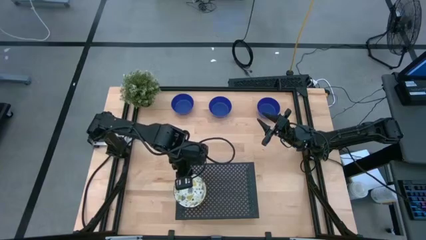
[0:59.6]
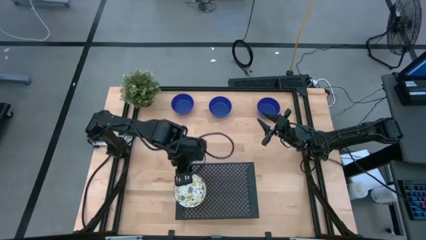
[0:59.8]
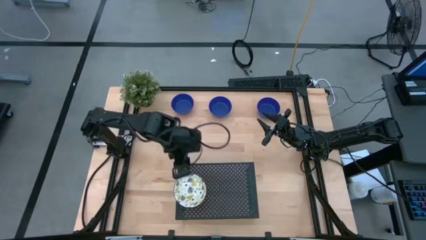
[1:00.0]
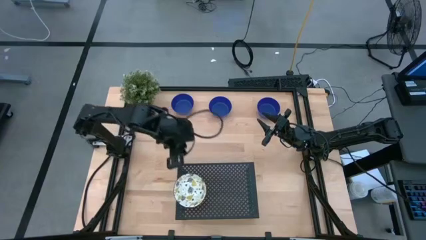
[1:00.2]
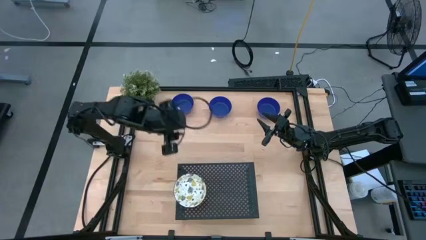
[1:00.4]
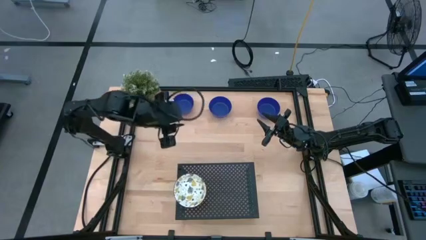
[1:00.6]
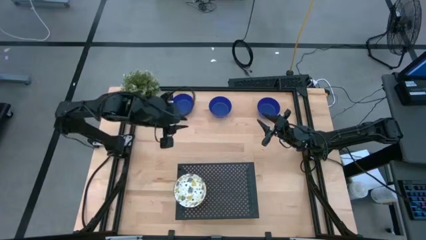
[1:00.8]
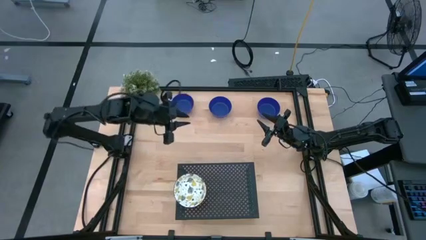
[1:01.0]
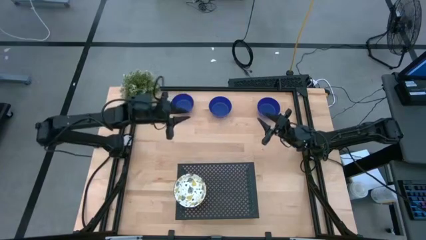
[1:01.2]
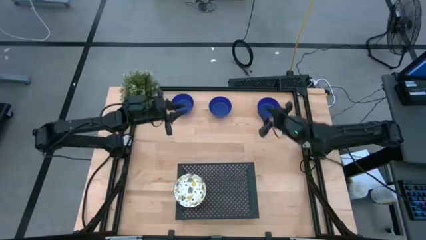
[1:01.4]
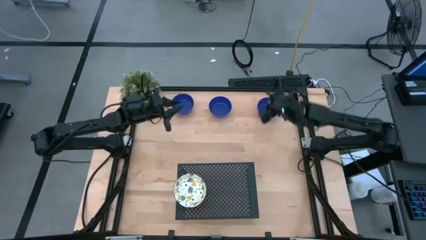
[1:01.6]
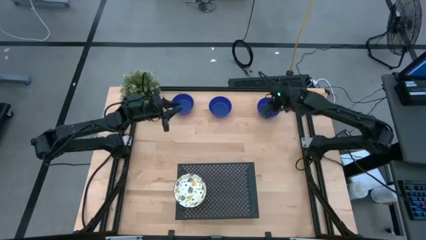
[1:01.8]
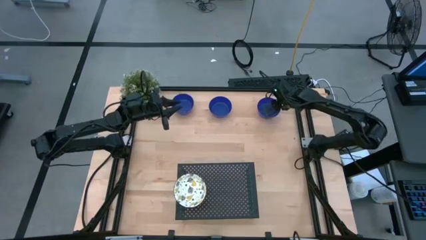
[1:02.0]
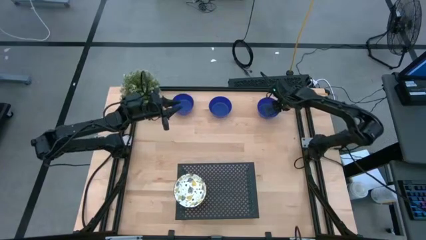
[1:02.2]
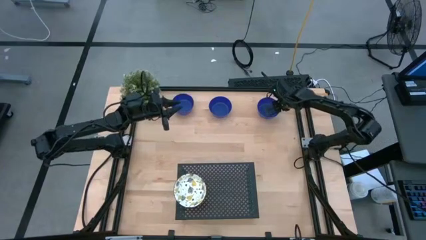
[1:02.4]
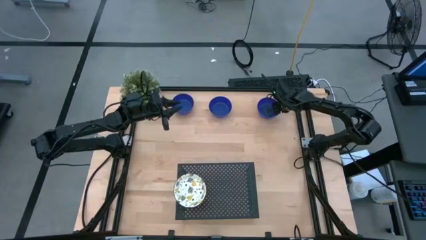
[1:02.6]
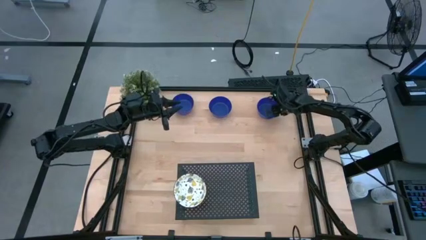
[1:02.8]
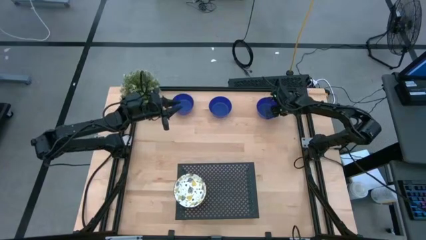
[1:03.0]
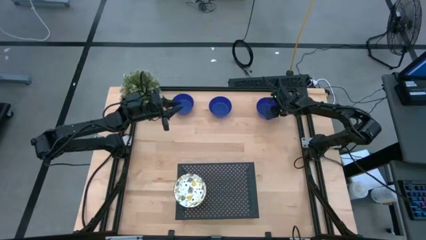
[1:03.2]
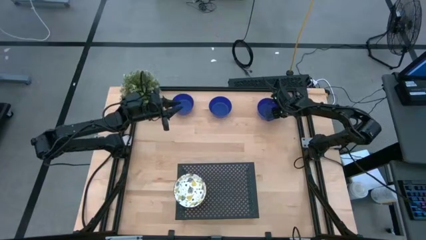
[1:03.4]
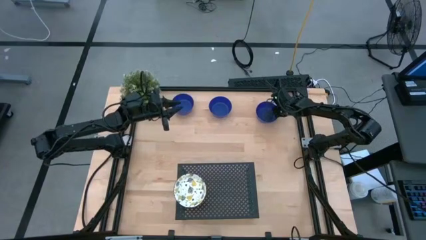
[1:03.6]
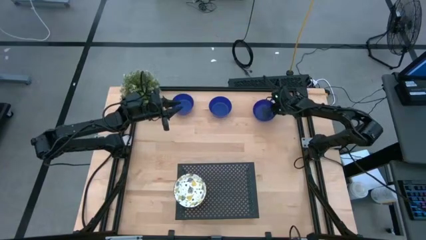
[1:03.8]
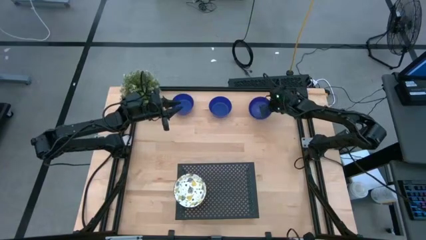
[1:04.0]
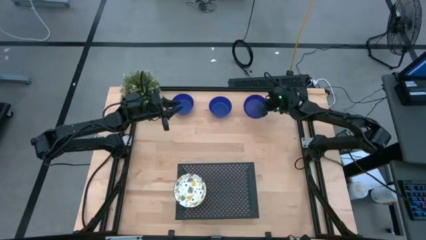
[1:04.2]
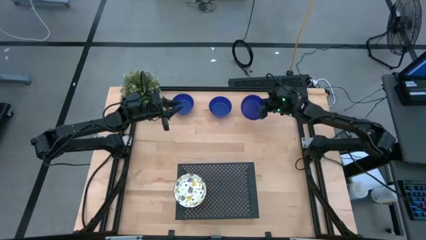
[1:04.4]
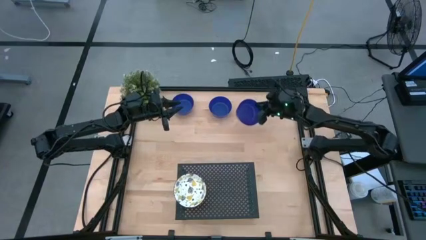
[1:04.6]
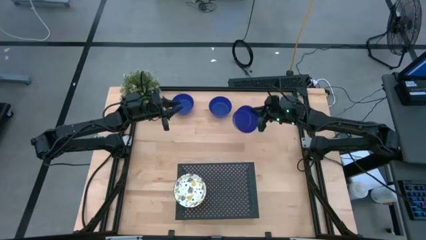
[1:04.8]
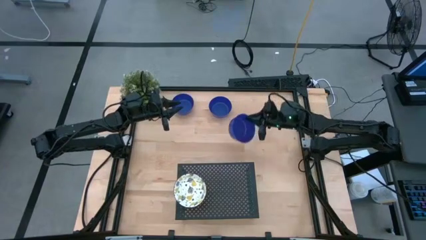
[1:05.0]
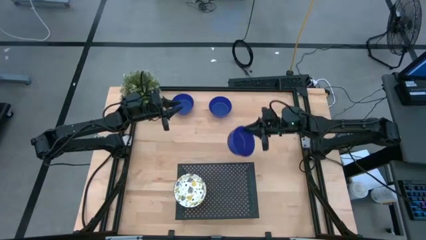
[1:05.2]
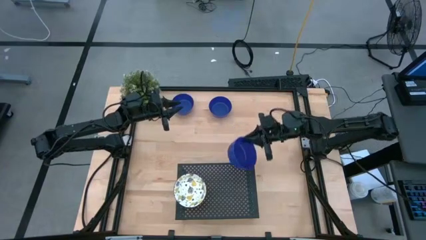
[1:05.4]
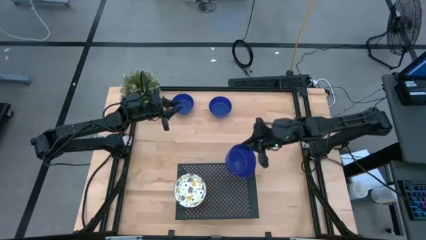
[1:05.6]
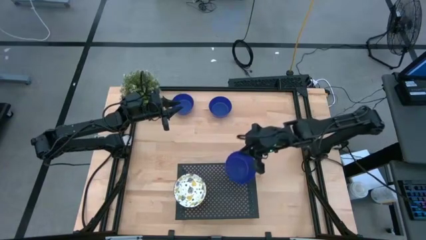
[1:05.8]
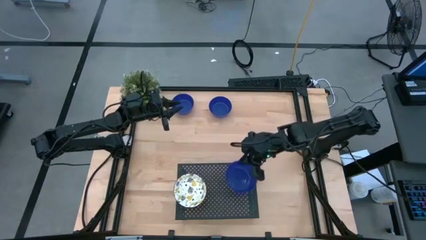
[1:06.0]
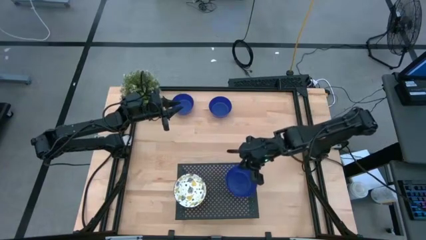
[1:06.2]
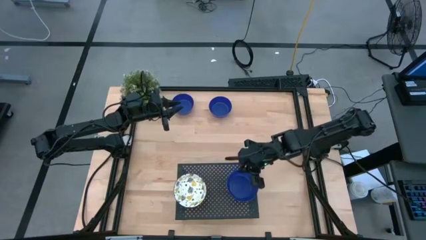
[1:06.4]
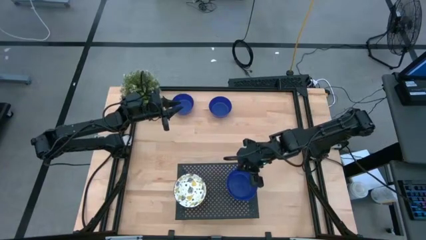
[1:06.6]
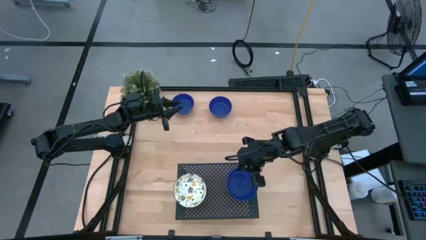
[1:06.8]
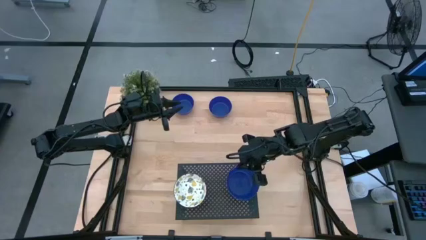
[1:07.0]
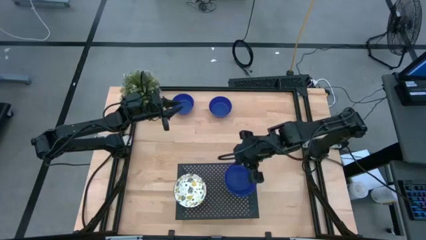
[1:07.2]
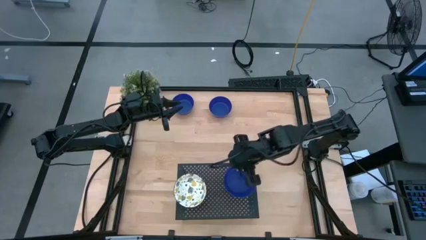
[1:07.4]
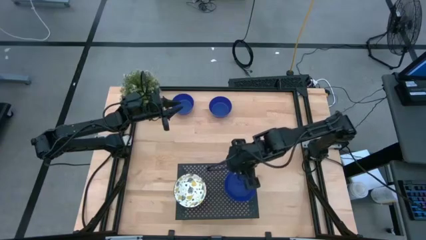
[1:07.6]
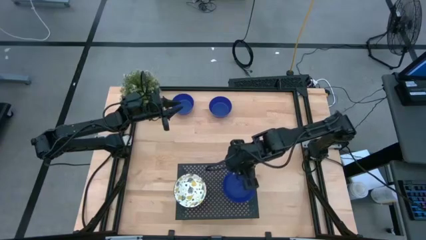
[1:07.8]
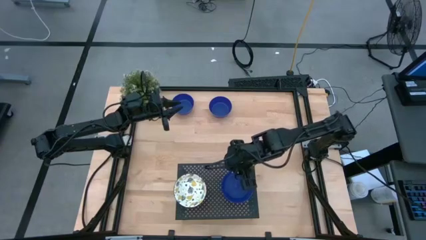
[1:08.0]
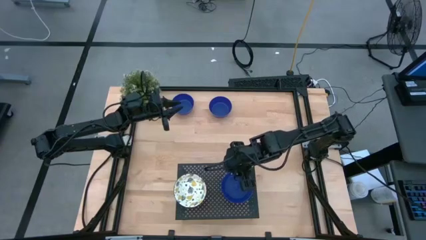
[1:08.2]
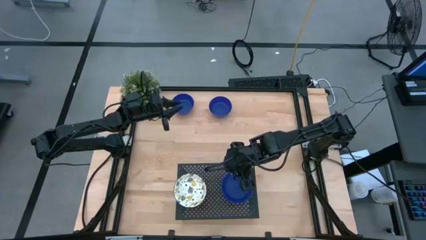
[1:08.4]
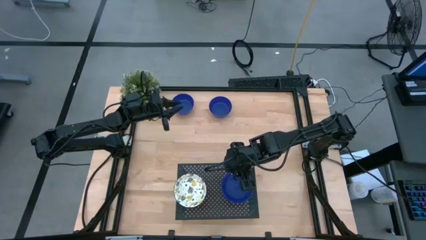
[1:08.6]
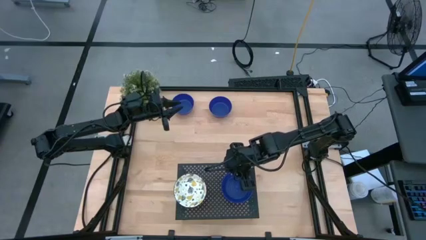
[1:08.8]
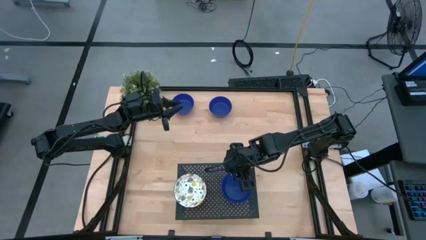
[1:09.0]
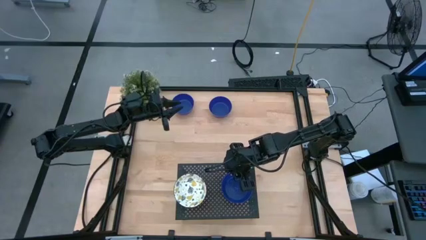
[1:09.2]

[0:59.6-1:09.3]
Task: Pick & Place Mini bowls
Put the right blue bowl on the shelf

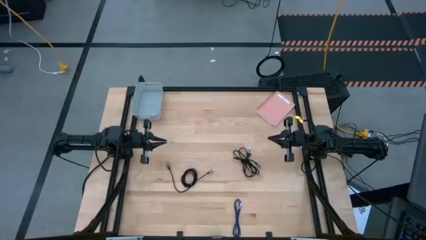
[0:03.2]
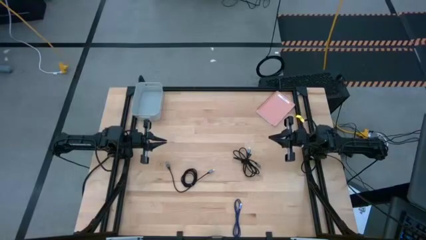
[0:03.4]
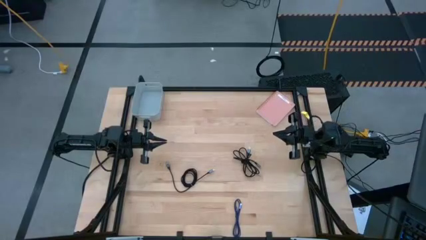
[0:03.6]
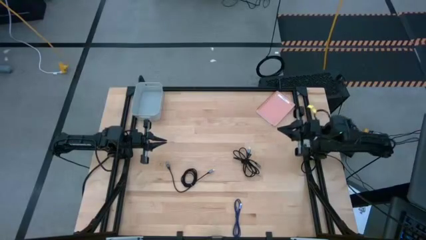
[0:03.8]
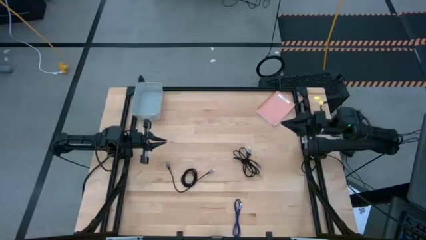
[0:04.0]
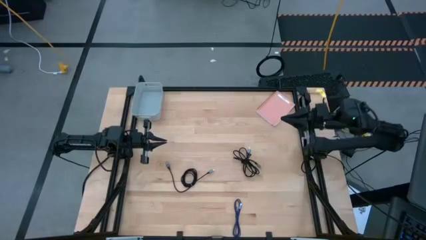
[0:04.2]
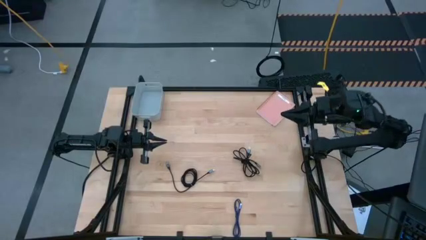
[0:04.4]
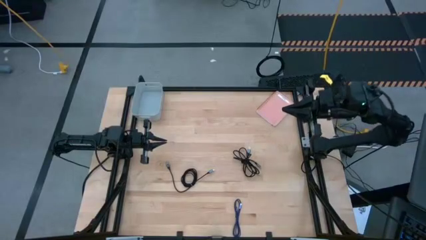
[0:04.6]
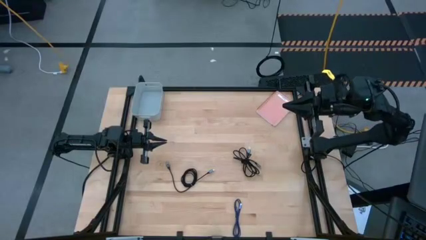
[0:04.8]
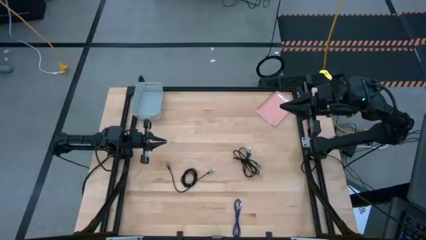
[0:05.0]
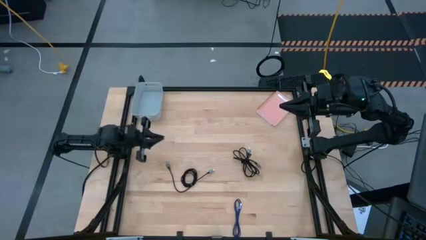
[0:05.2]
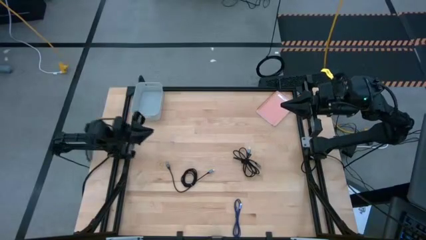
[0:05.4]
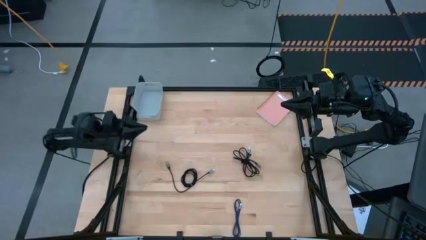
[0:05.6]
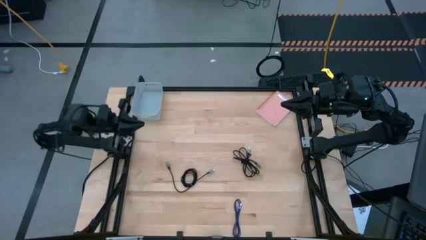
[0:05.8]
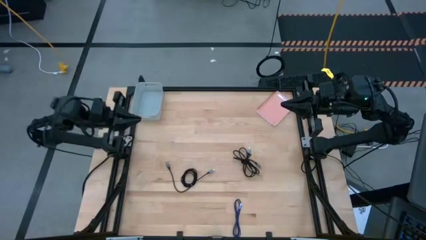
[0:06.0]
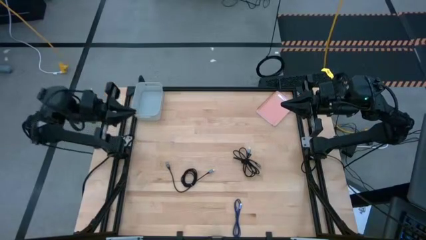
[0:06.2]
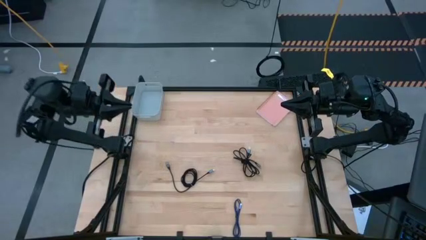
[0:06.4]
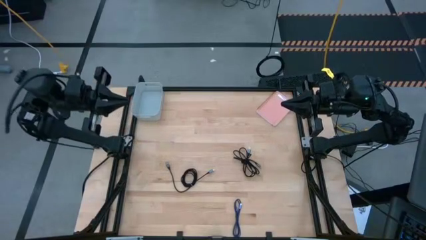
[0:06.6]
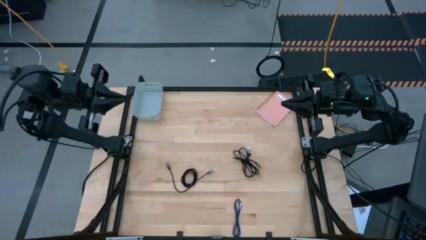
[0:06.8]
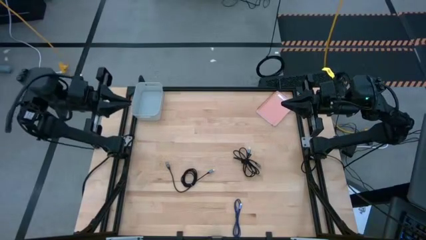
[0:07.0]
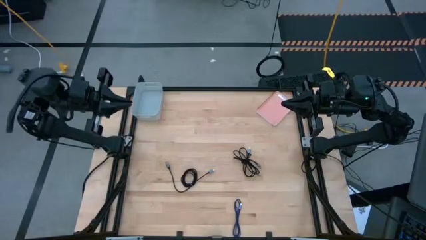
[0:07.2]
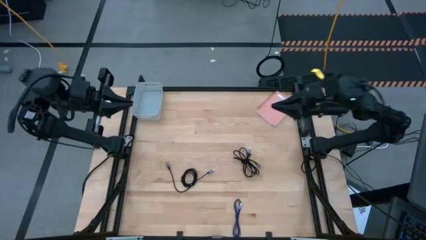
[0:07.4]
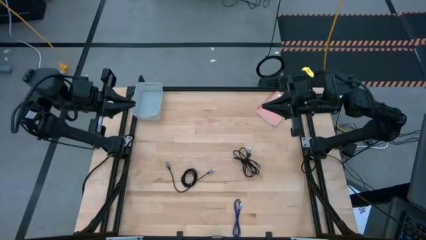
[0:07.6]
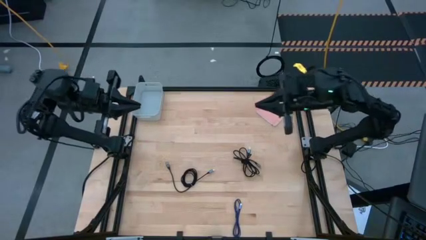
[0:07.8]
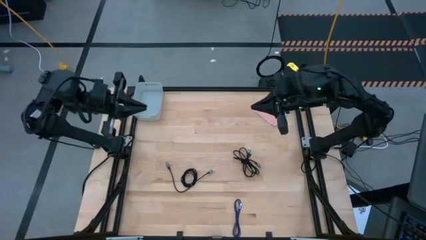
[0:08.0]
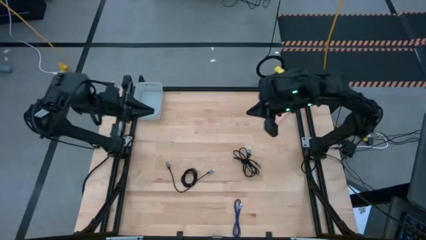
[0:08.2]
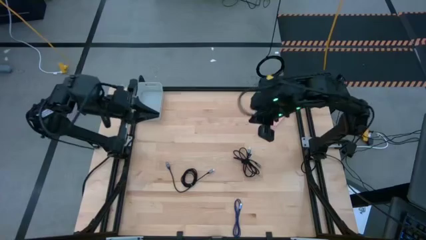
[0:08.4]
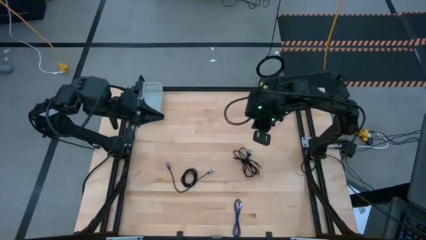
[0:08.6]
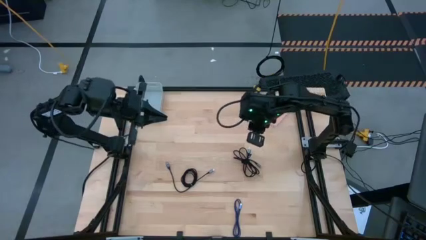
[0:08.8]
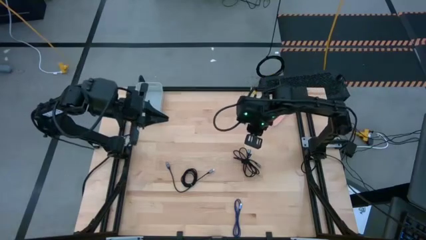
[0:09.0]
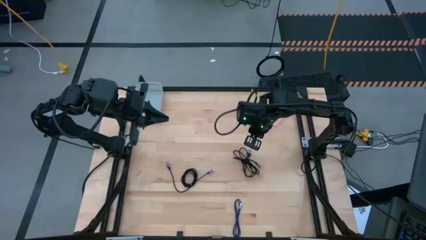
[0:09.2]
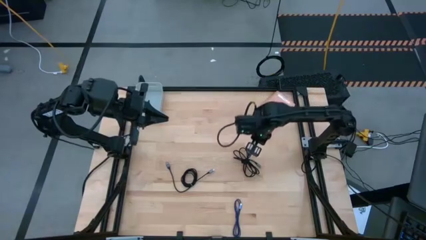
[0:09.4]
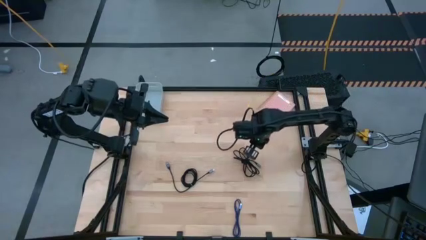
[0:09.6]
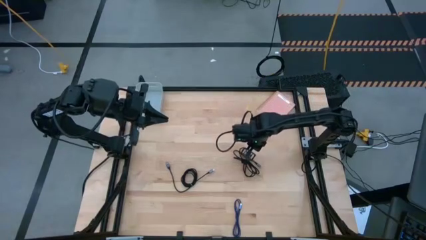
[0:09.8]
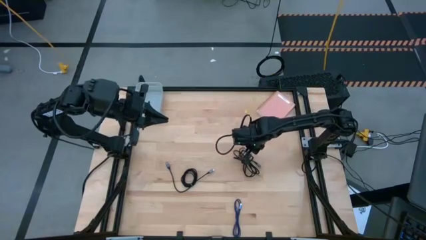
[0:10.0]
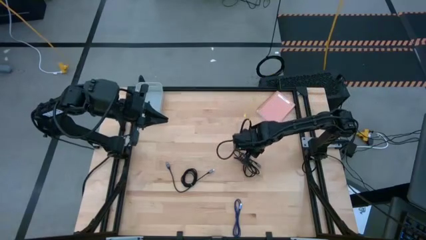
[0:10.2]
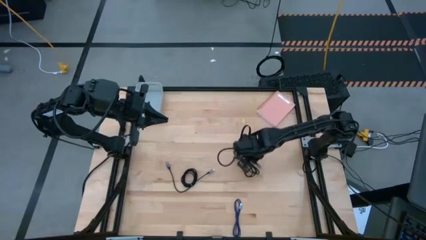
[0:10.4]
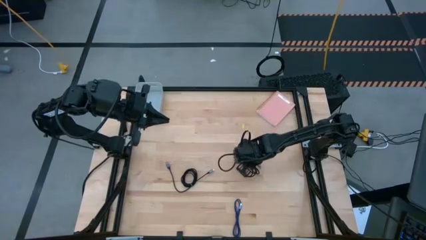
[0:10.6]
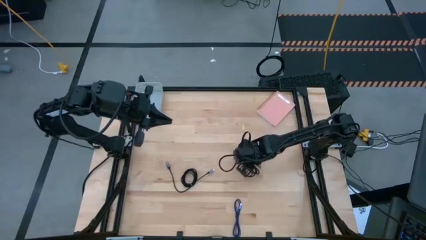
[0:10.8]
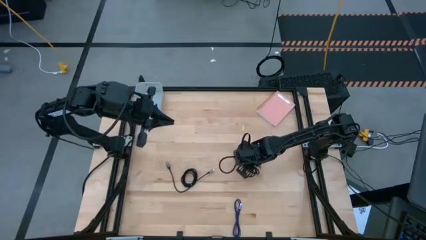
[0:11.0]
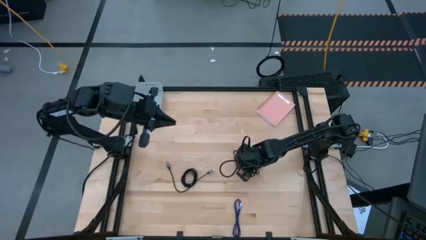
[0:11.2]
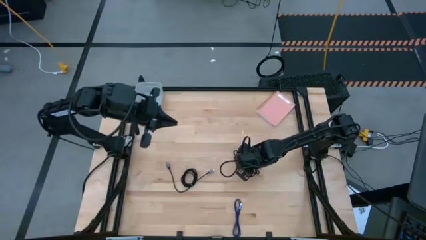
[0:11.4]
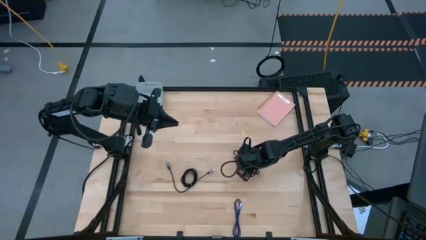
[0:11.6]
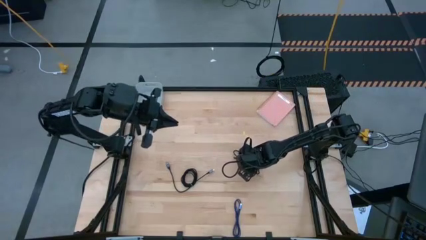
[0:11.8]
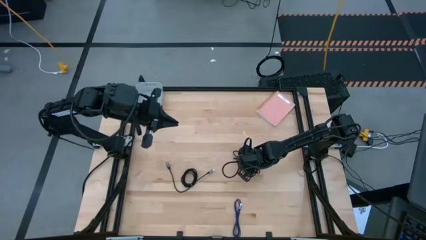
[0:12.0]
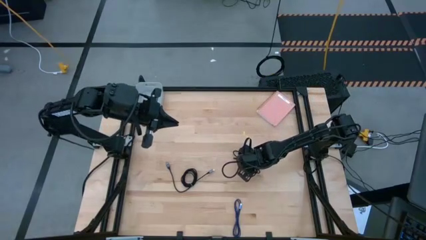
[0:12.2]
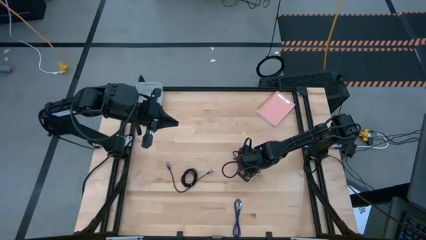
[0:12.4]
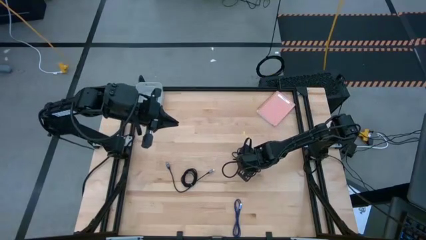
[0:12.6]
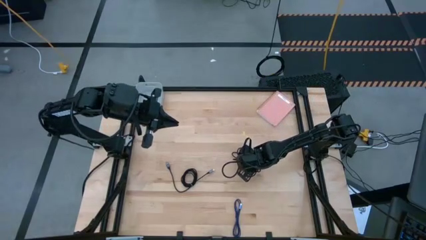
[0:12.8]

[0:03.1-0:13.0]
Task: Pick and place USB-C Cables
Put the right black charger cable into the gray bin
